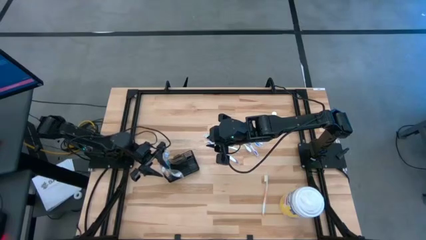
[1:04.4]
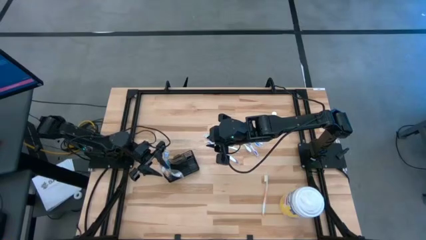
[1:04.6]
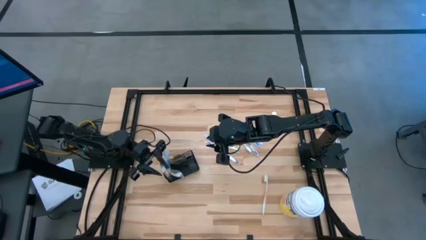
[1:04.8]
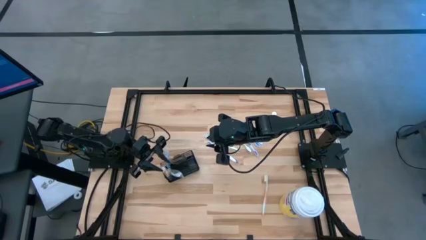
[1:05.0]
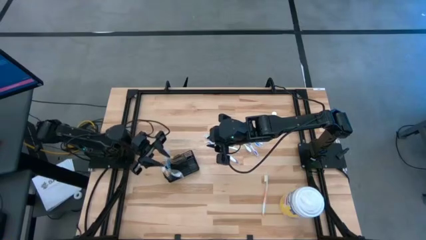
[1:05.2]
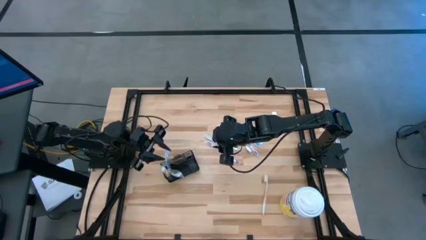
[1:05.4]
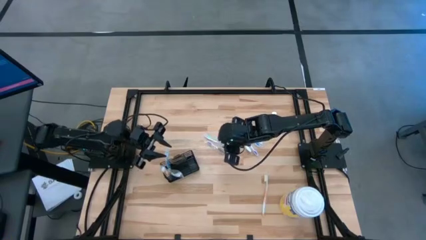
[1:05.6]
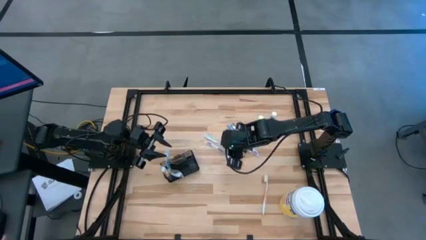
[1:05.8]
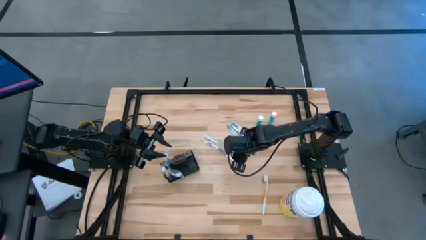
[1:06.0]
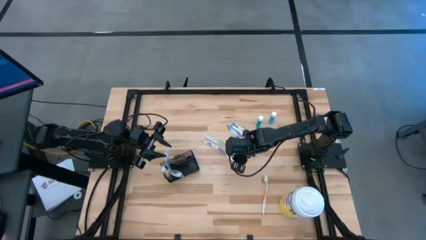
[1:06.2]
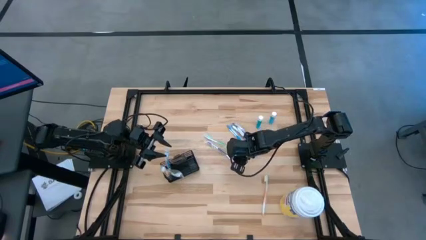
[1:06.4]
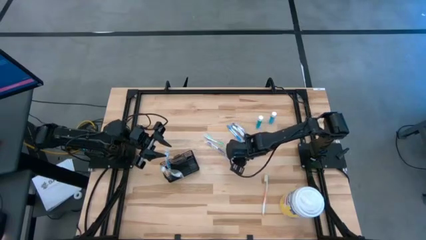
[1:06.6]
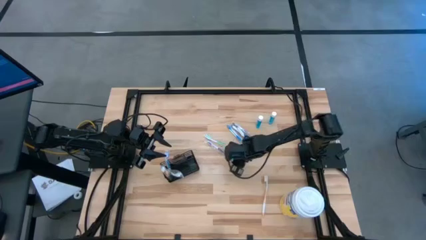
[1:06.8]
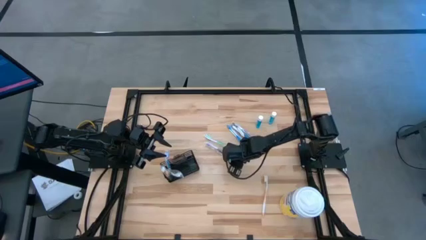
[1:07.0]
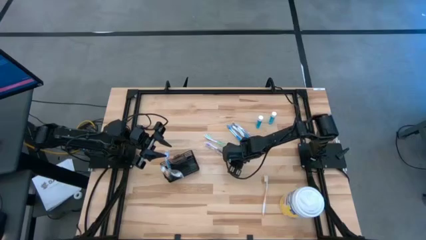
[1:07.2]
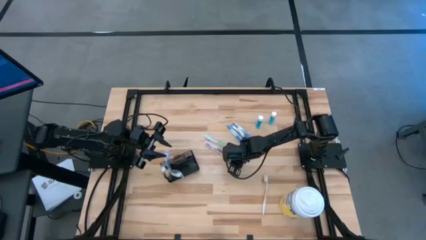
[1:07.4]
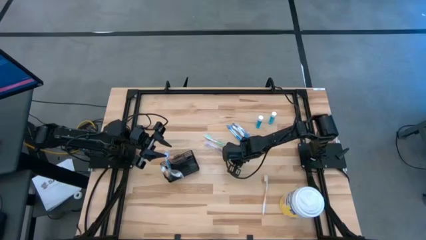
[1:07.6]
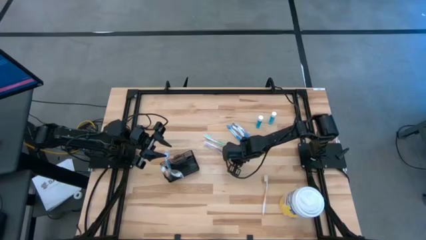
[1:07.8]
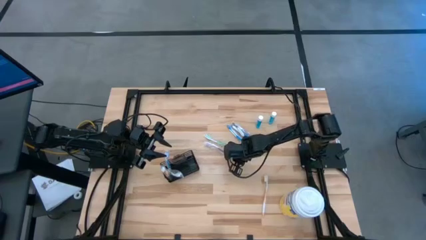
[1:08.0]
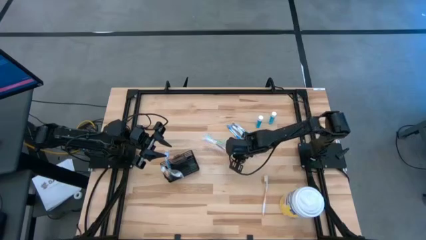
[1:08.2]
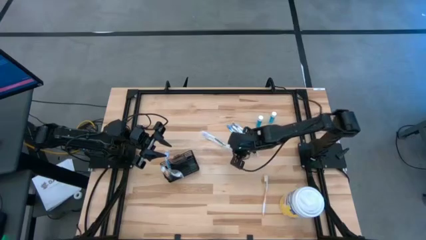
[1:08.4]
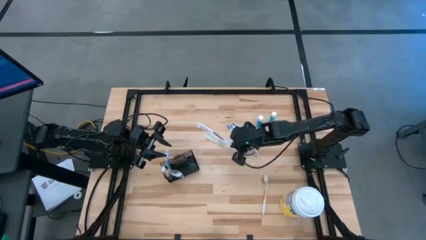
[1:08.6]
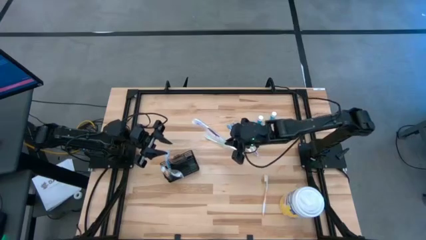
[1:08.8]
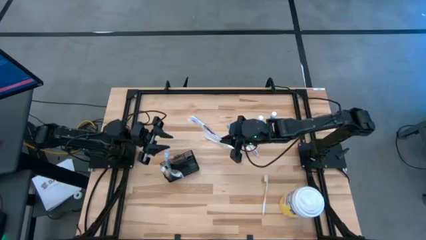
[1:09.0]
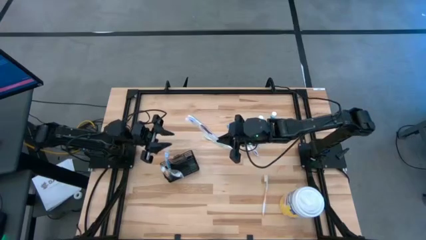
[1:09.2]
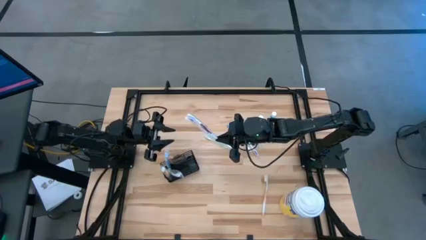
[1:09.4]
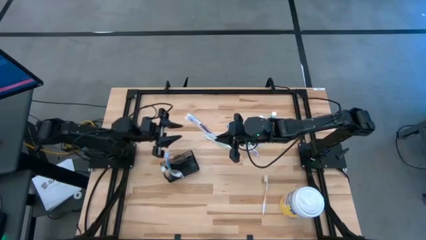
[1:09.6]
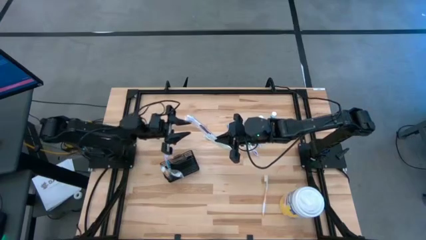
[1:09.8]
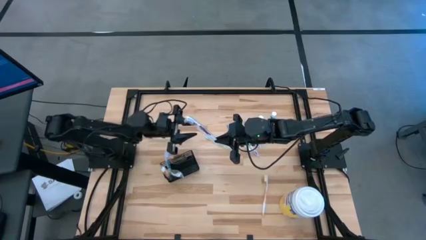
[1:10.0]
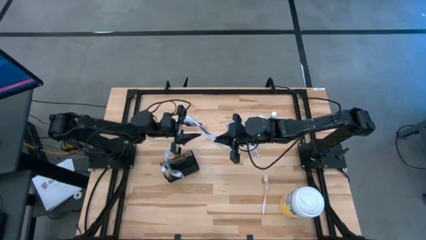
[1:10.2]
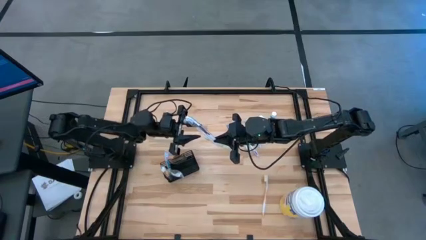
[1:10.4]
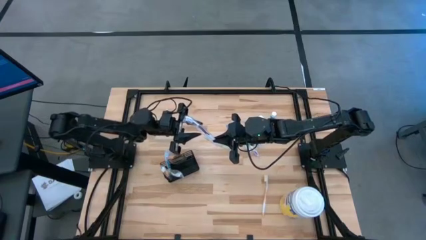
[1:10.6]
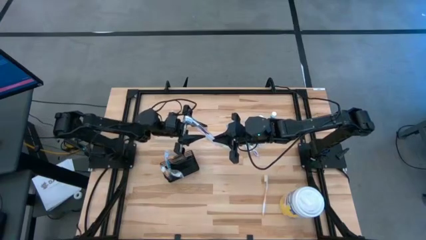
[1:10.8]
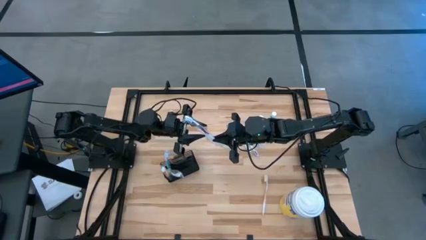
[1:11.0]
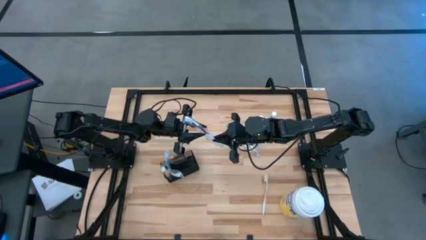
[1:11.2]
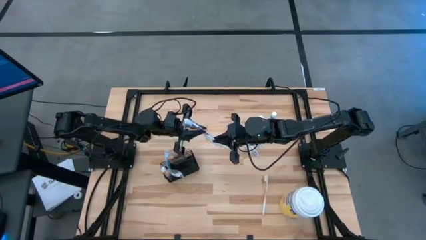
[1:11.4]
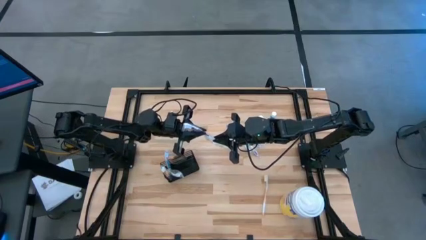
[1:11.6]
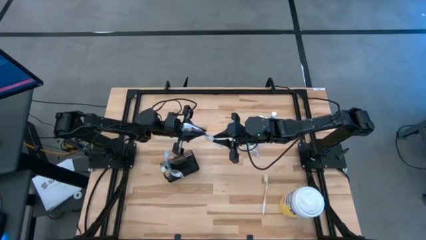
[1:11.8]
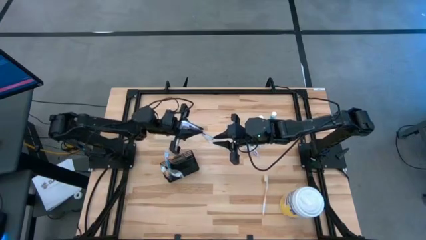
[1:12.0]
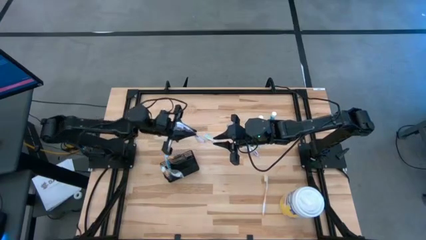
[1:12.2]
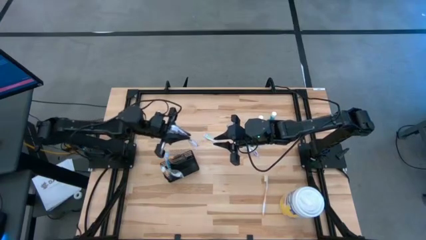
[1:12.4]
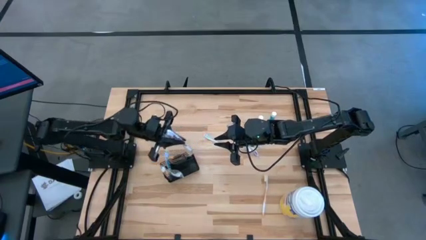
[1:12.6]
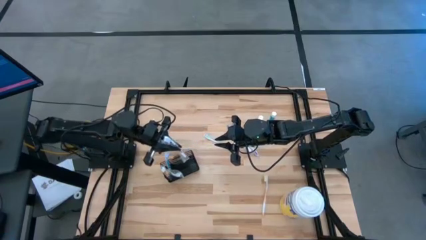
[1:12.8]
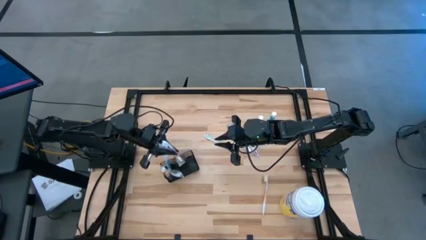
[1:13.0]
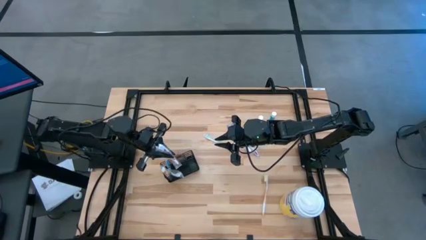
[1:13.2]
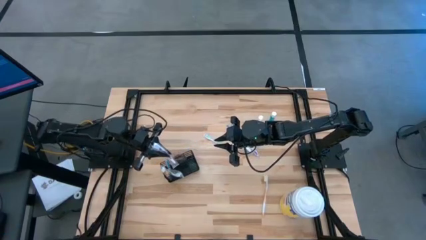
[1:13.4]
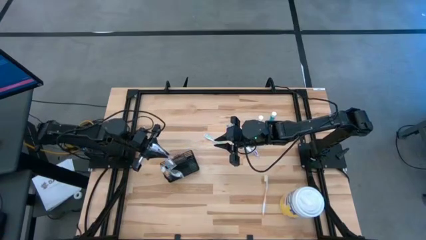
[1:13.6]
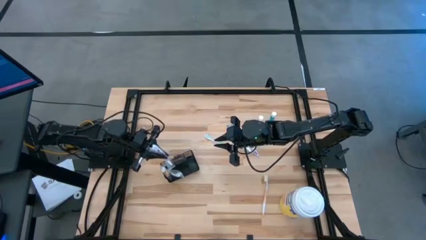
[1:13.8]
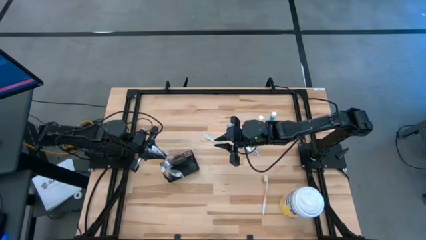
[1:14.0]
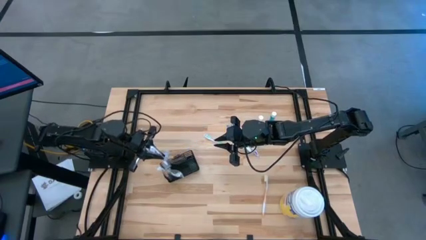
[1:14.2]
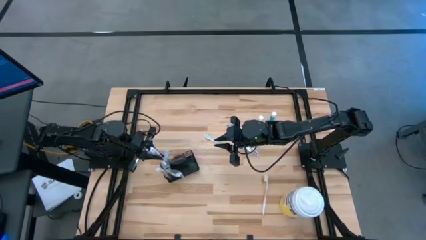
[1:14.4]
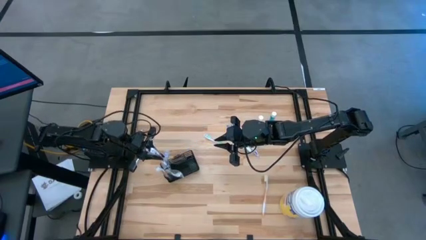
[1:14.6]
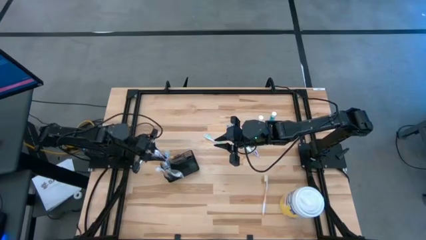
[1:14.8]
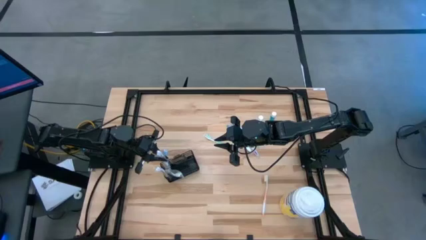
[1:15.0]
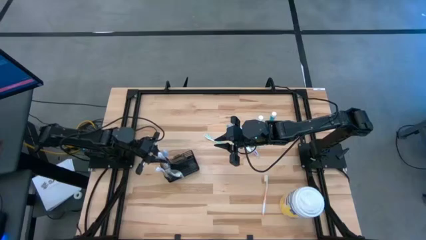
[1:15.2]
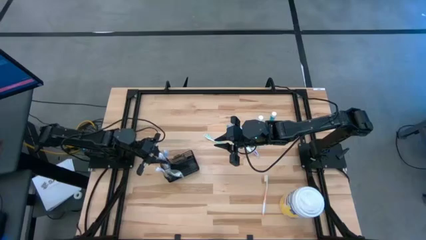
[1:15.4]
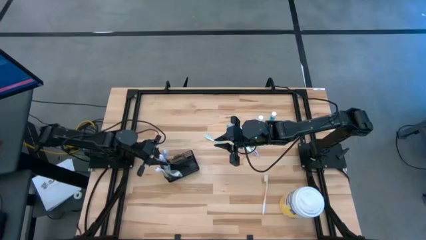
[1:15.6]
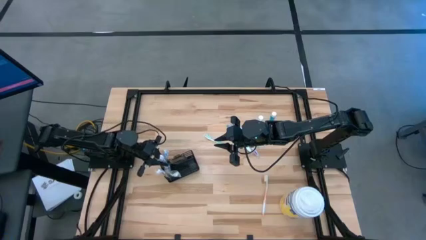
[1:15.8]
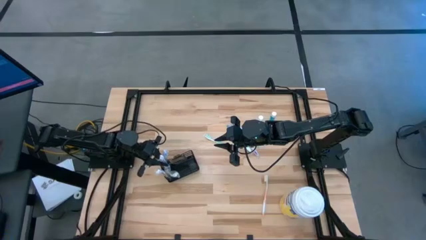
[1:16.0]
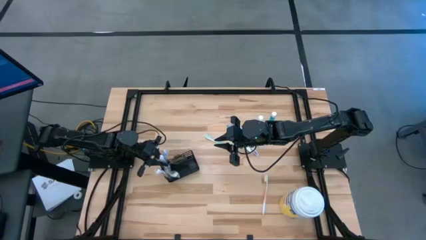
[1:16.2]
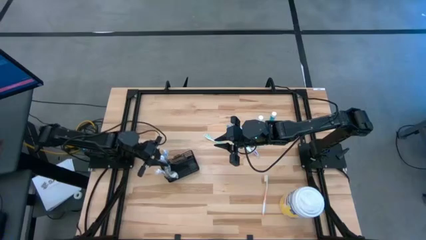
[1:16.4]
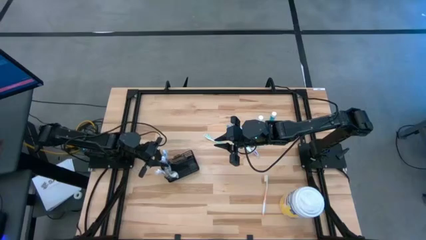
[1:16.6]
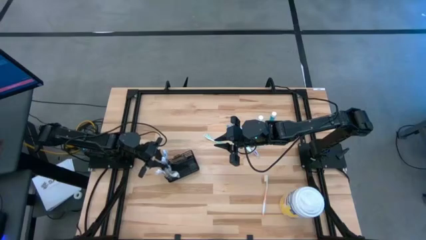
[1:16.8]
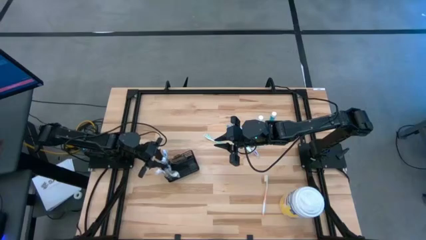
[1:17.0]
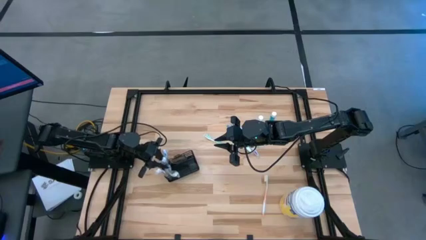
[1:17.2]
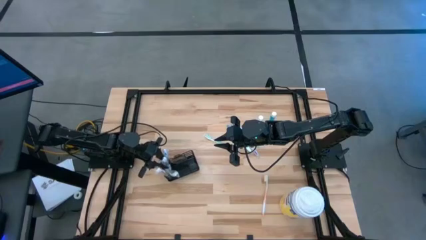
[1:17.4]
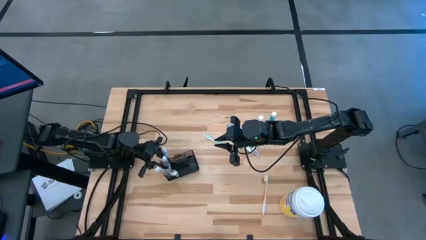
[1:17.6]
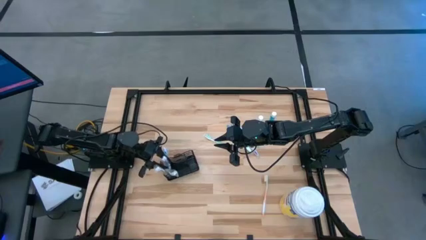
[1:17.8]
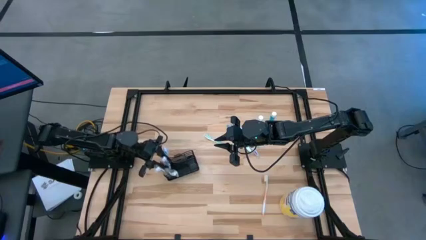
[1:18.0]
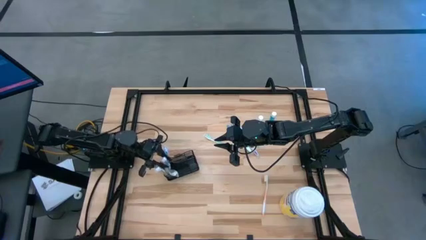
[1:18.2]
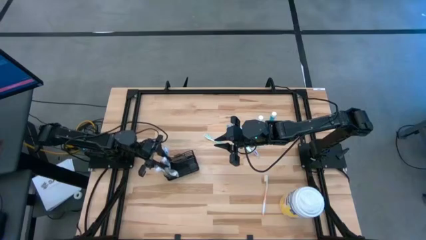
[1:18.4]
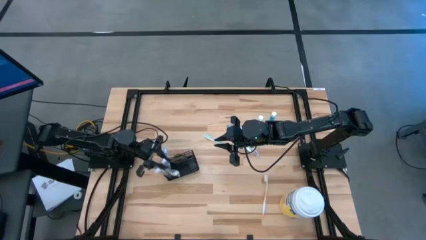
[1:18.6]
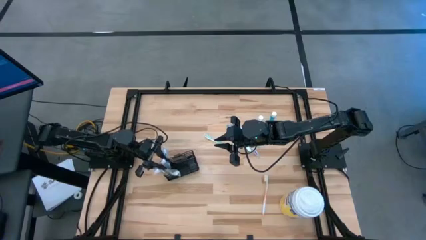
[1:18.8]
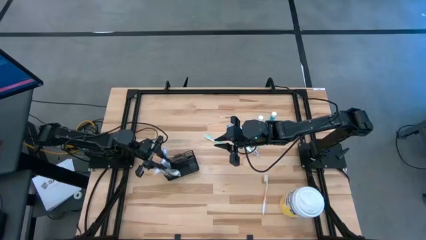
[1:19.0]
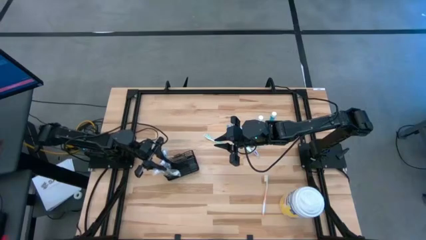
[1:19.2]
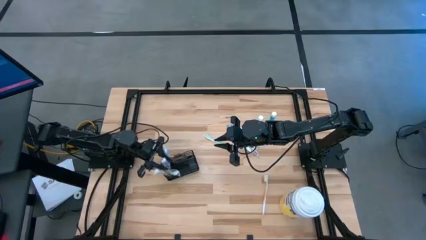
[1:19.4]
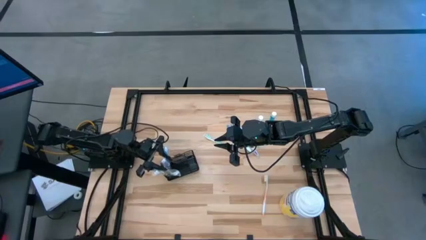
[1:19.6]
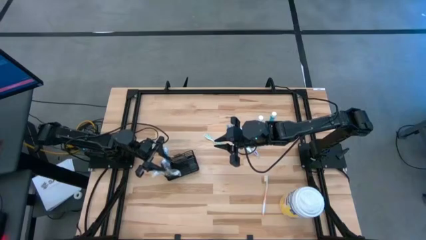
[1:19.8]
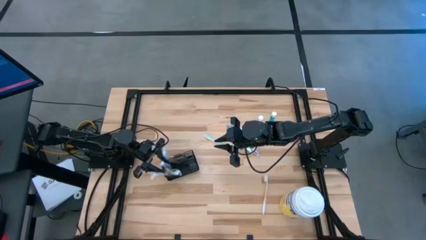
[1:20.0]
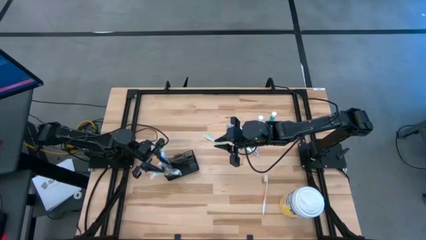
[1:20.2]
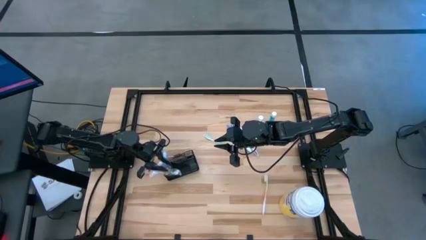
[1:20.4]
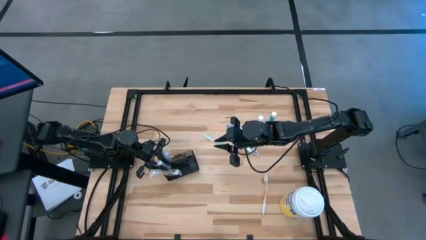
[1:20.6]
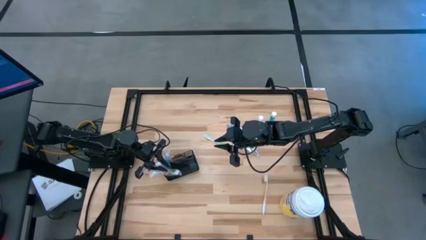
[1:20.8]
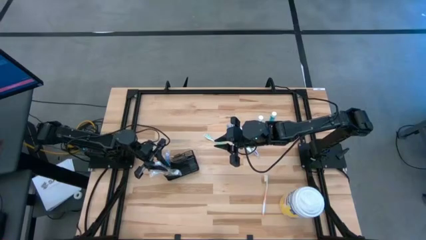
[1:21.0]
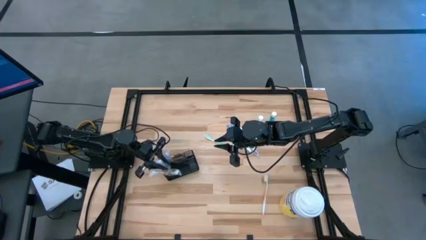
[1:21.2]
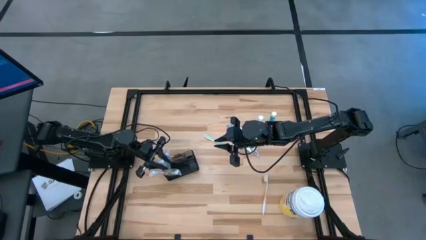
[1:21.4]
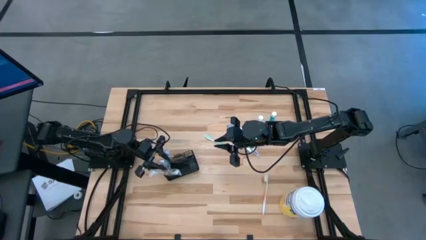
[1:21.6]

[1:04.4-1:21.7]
Task: Pick & Place toothbrushing station
Put the left purple toothbrush into the top left section of the mesh organizer
